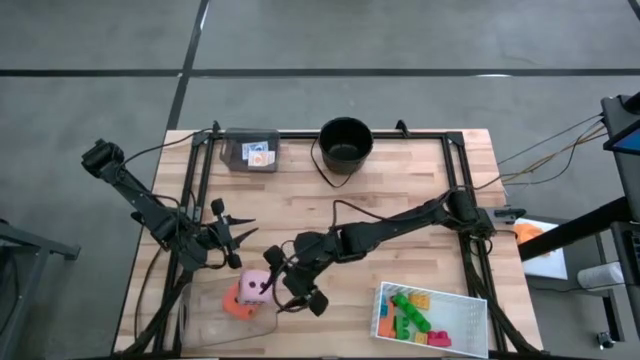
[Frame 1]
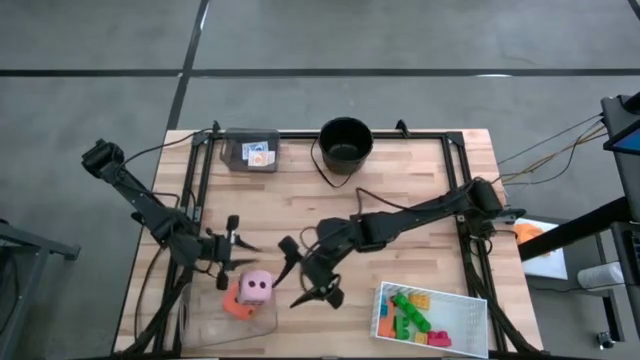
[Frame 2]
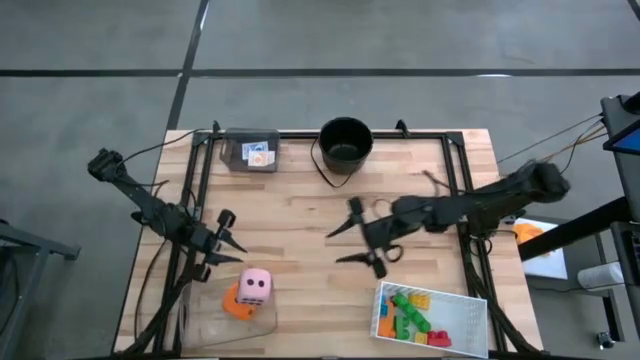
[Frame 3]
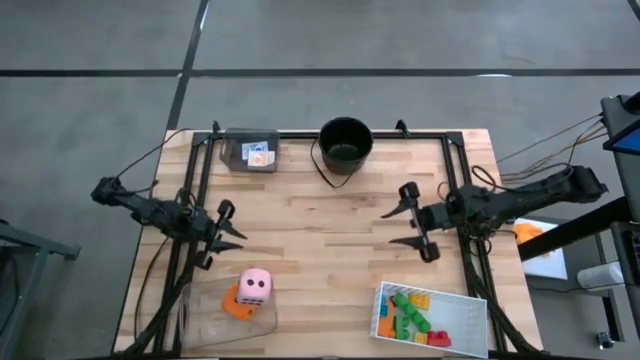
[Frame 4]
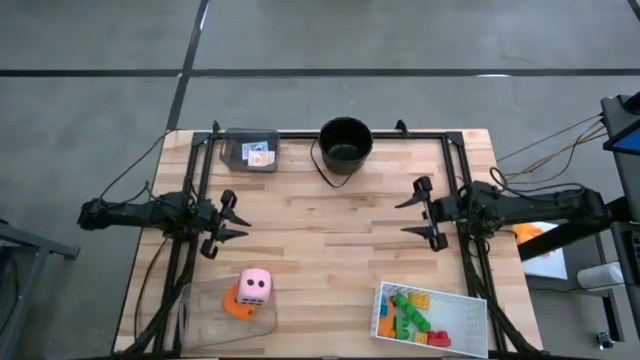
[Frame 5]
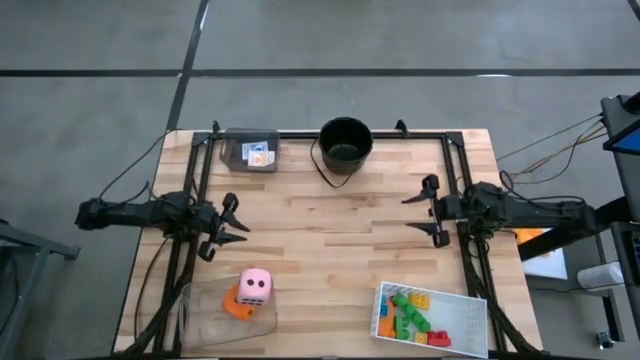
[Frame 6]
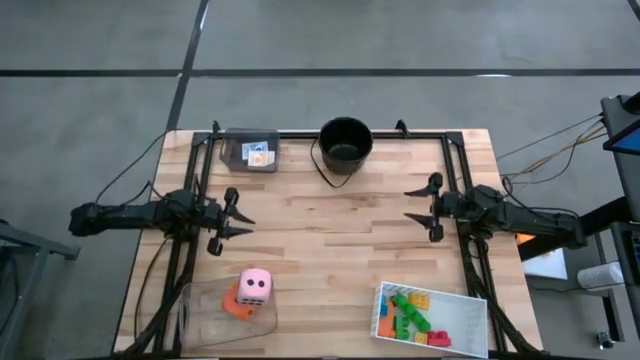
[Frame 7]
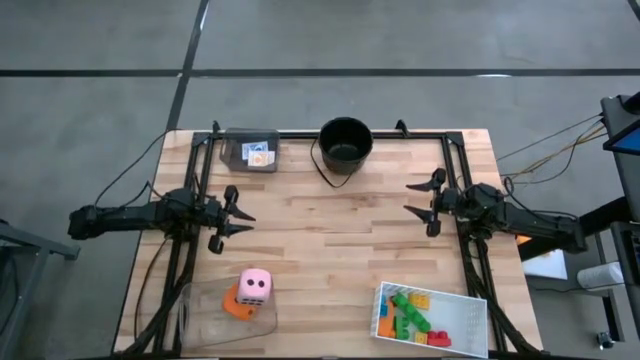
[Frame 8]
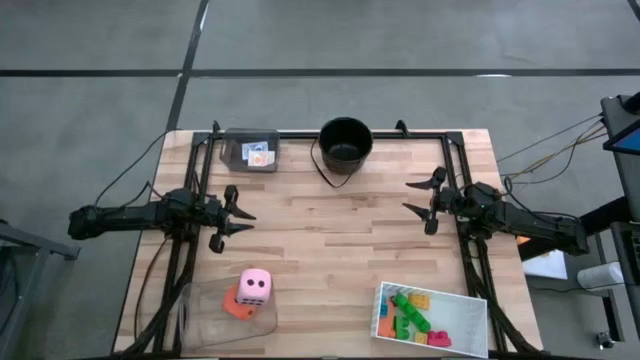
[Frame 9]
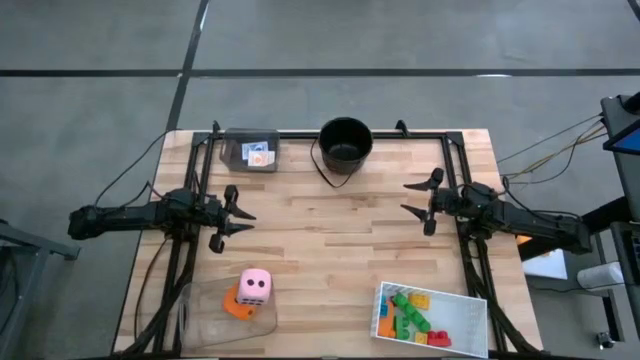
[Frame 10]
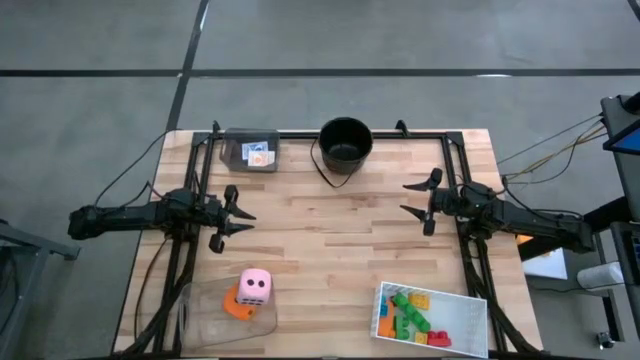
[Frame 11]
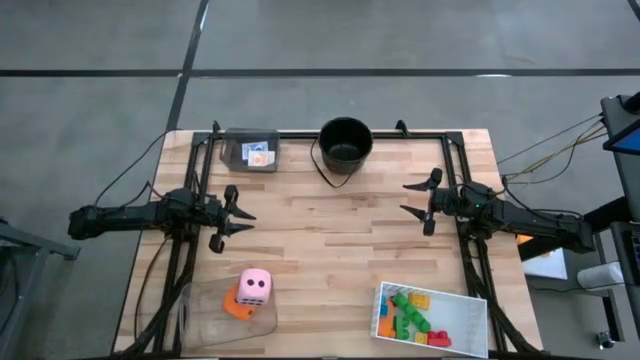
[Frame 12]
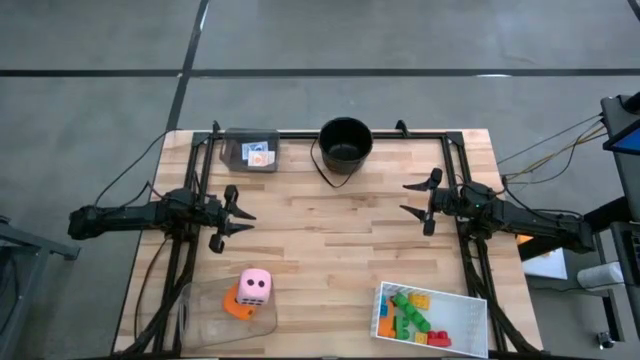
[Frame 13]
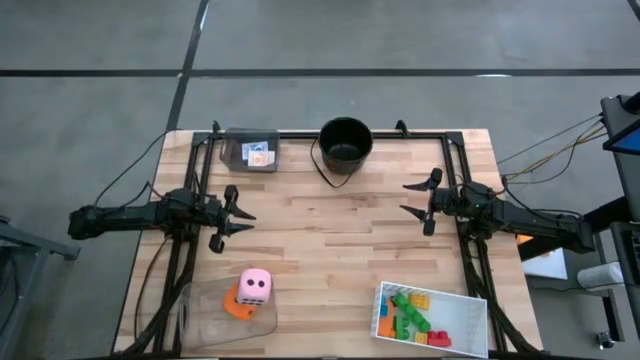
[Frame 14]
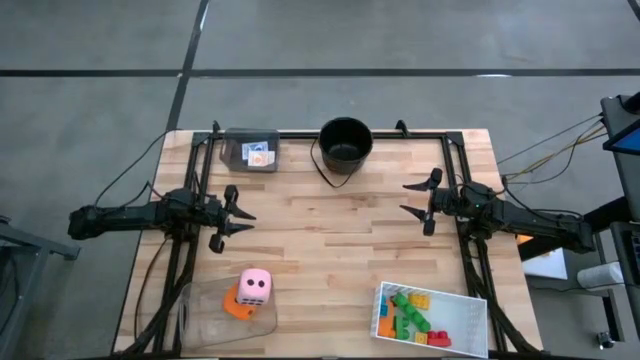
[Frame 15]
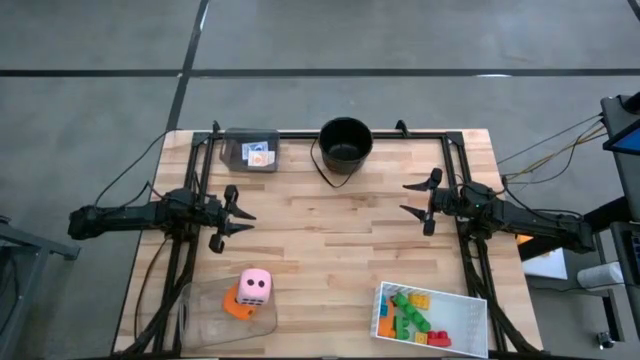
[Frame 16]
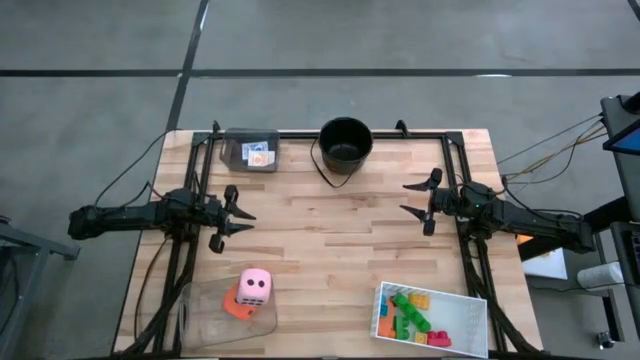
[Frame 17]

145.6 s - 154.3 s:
Task: Pick & Place Toys
Return to Home Position

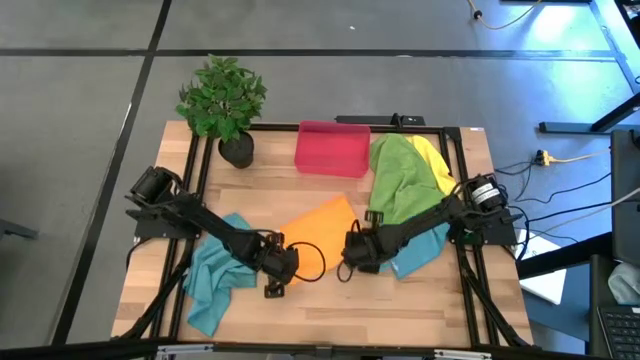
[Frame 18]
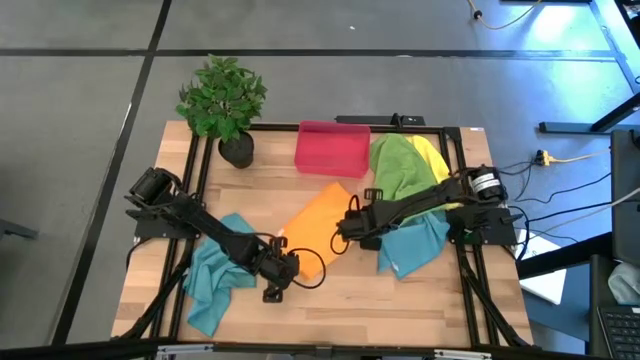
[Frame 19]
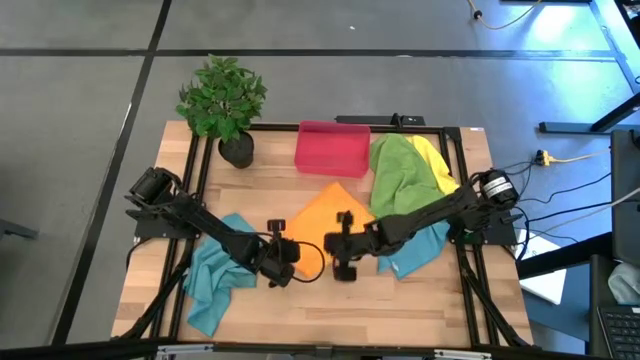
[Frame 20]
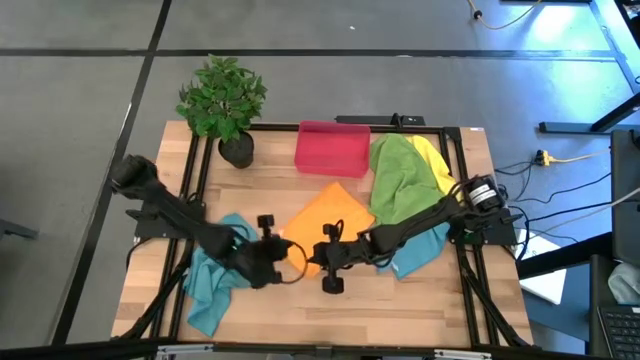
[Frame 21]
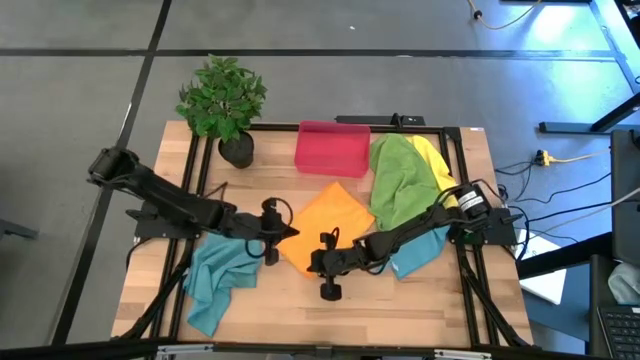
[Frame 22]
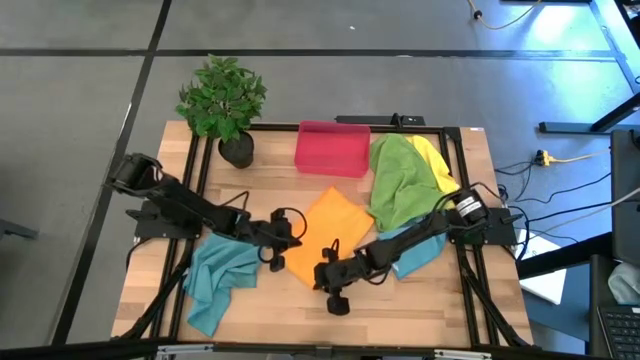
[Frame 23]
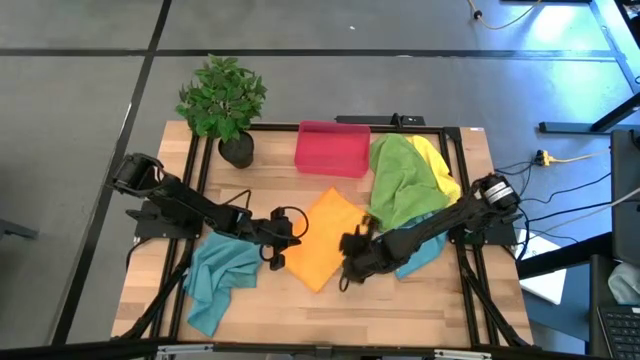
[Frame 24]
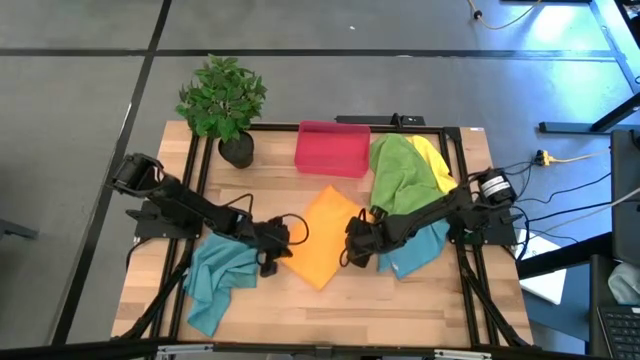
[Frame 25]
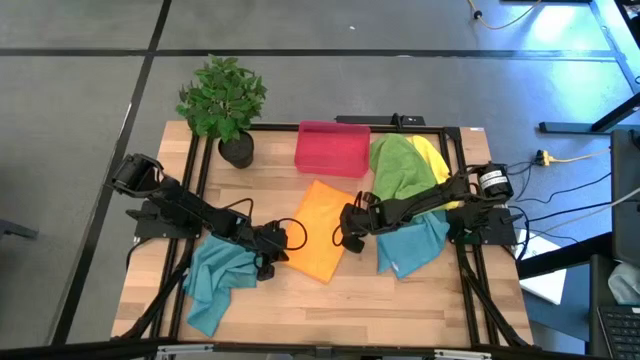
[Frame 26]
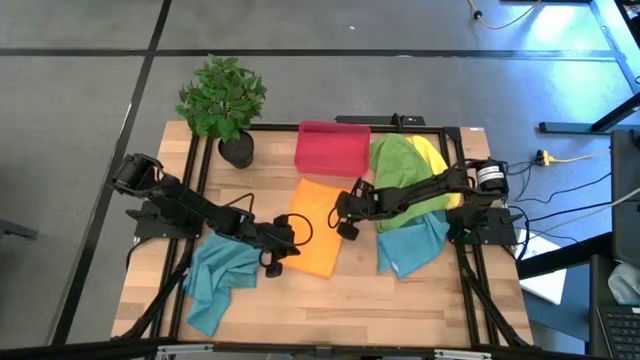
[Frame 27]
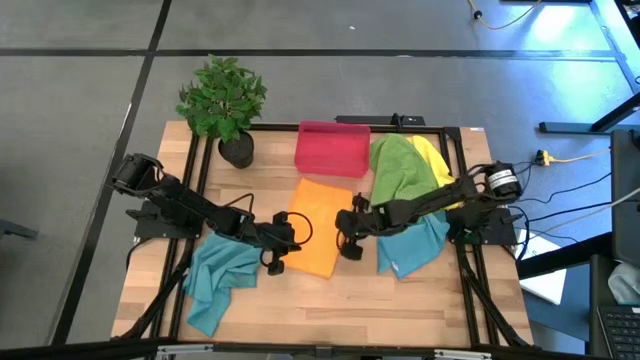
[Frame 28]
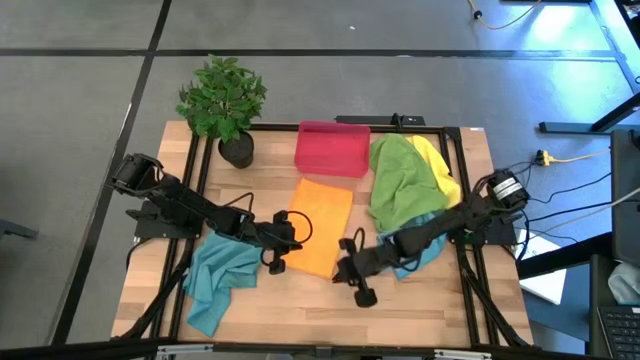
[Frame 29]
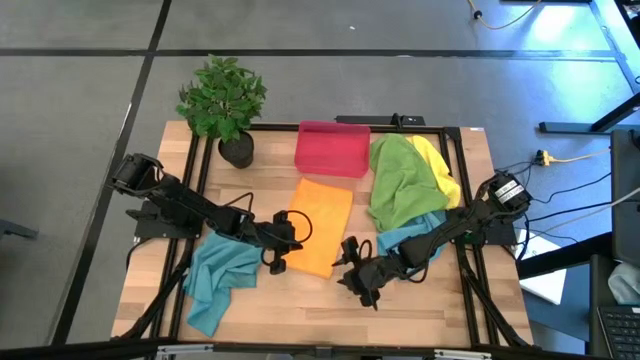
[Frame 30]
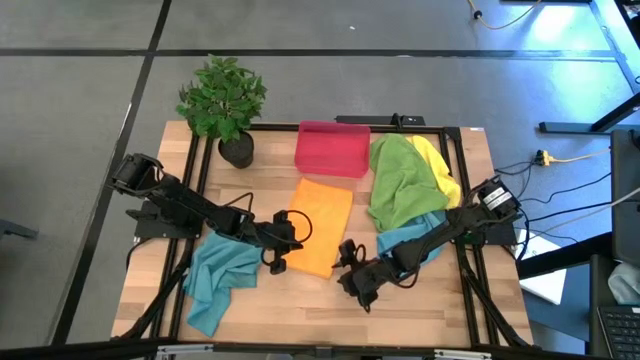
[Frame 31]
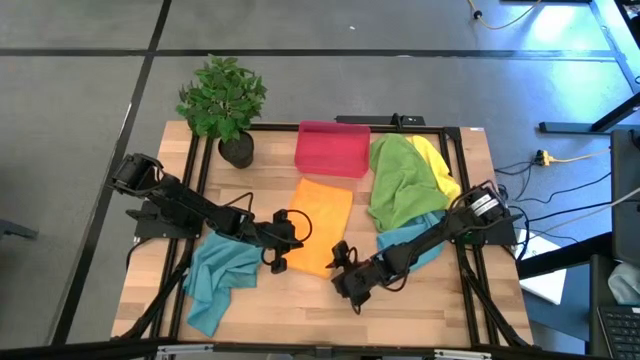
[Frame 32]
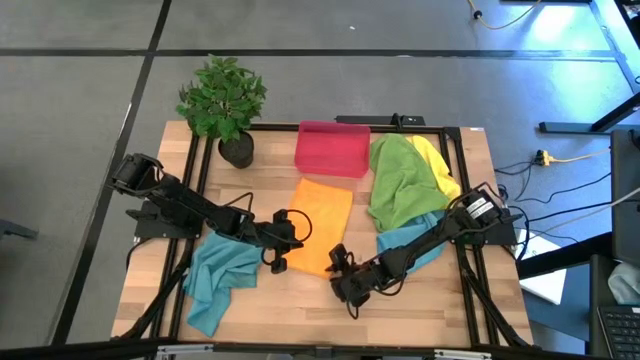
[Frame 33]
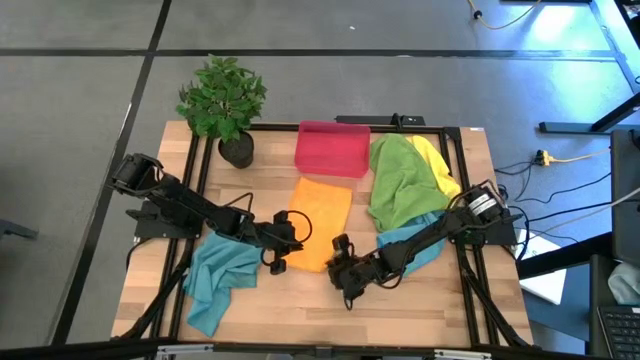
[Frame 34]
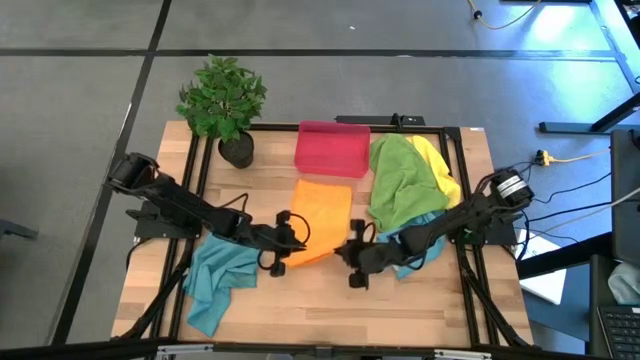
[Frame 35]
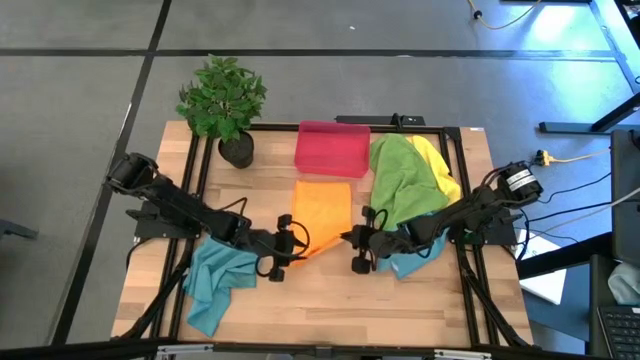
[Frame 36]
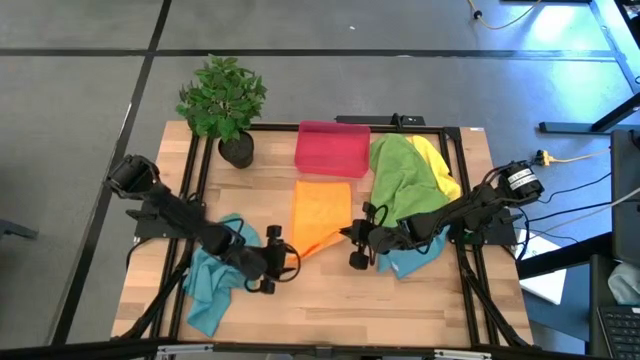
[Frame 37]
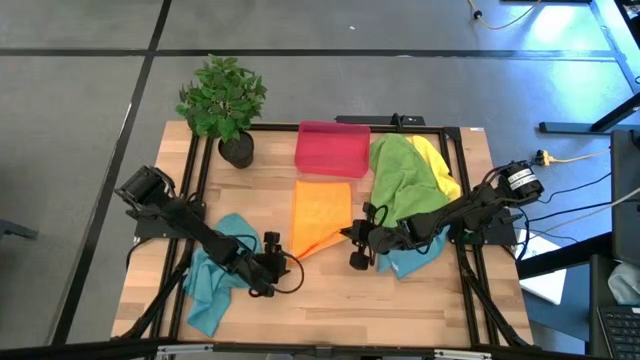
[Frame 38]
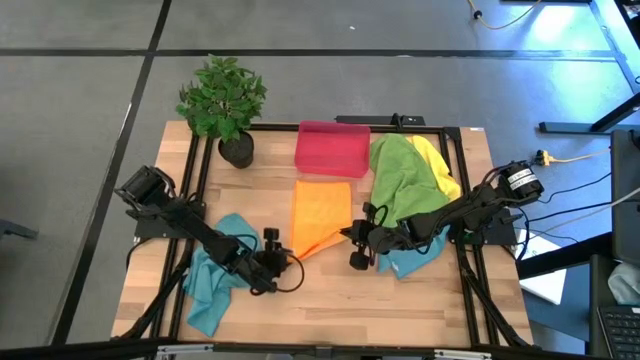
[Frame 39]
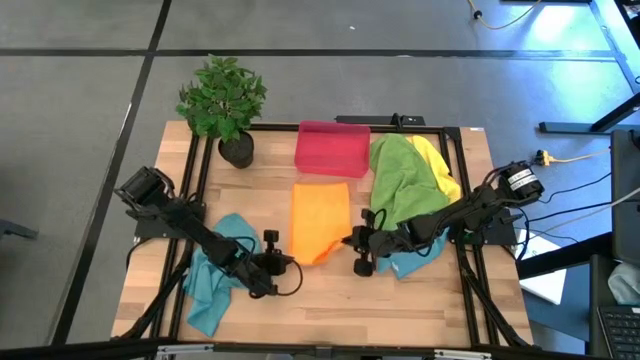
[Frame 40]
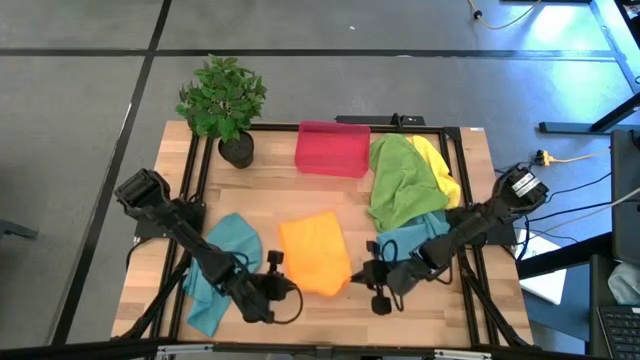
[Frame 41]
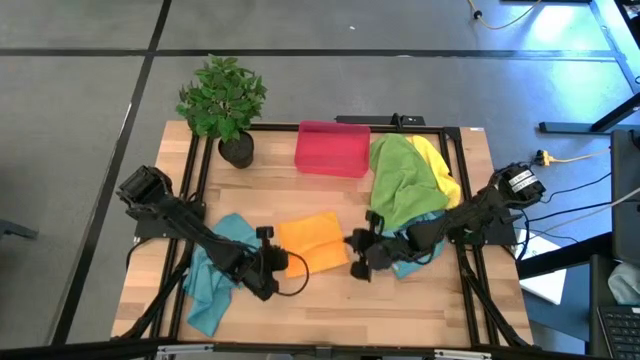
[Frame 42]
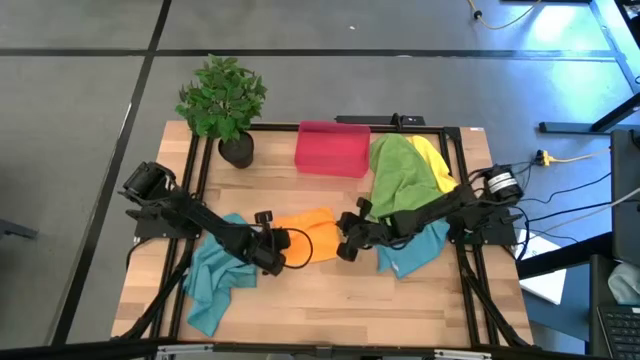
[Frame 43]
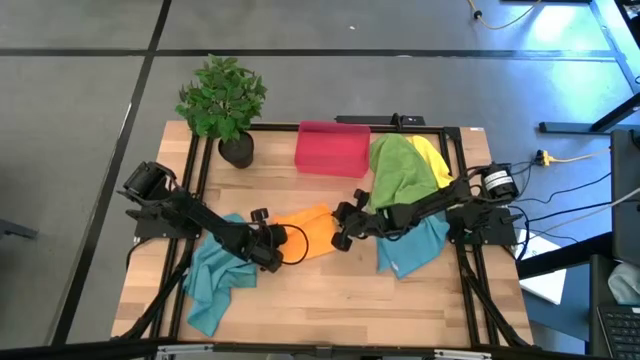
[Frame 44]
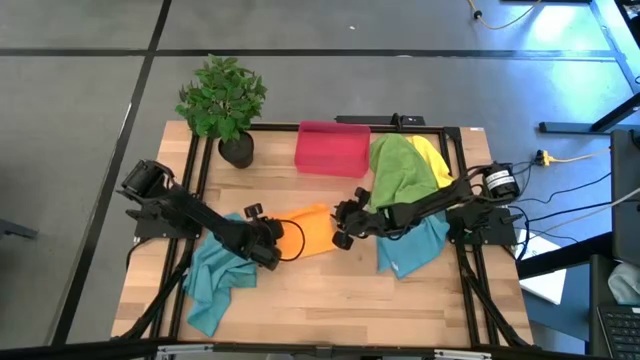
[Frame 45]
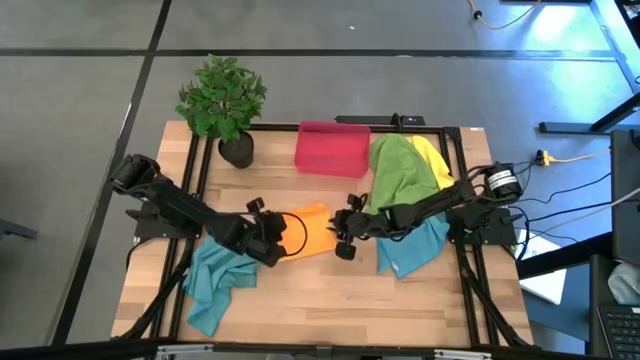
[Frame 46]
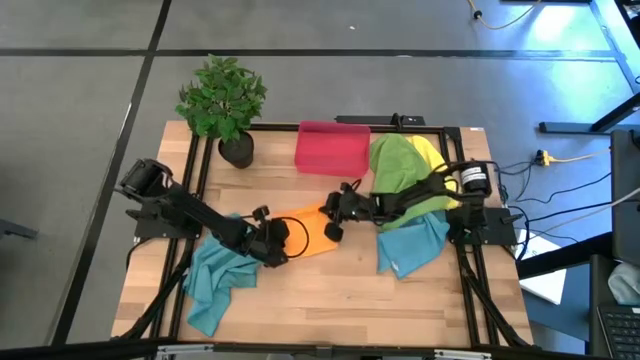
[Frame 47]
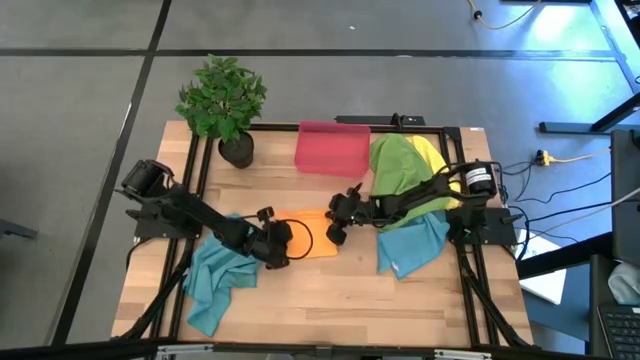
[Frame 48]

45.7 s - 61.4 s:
Task: Roll microfiber towels into tight, uniform cylinder then place into a basket
Fold the orange towel
